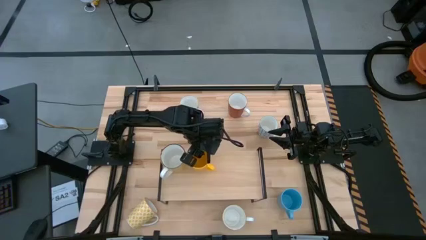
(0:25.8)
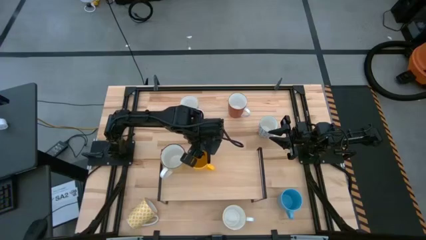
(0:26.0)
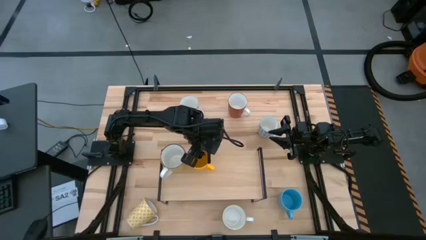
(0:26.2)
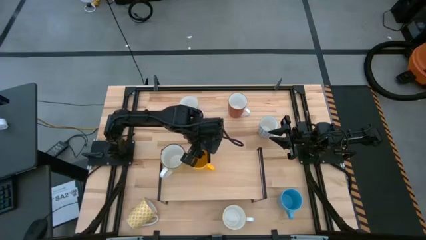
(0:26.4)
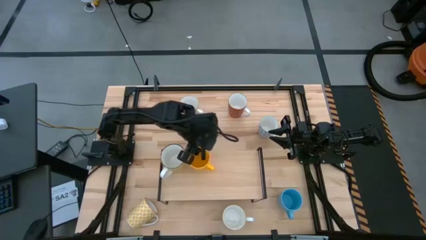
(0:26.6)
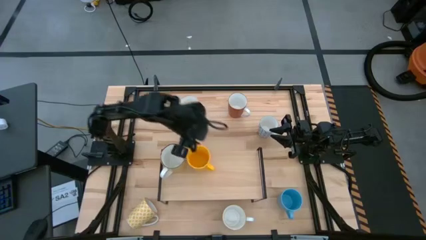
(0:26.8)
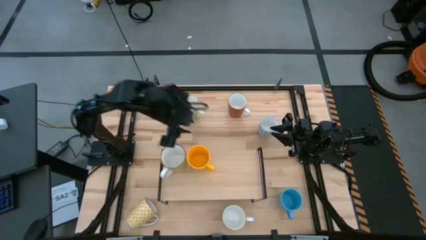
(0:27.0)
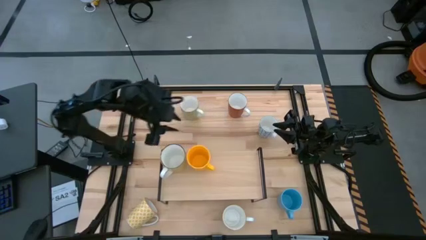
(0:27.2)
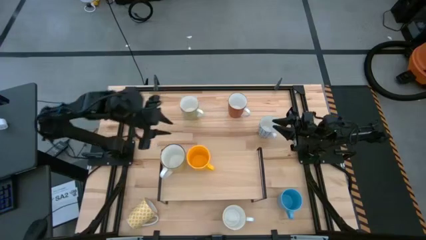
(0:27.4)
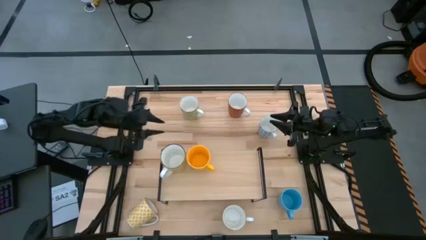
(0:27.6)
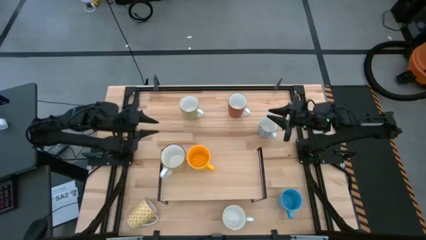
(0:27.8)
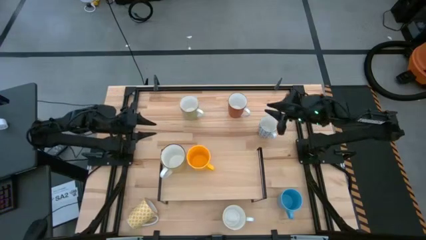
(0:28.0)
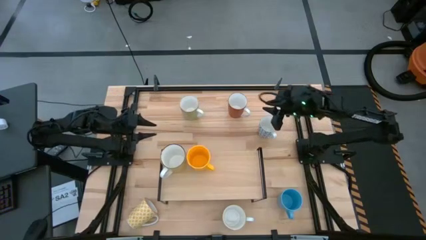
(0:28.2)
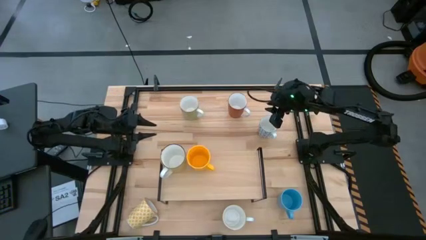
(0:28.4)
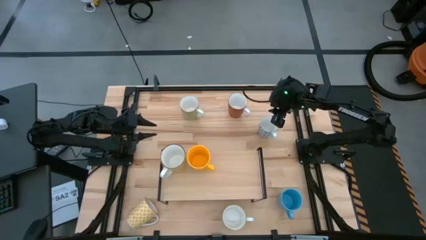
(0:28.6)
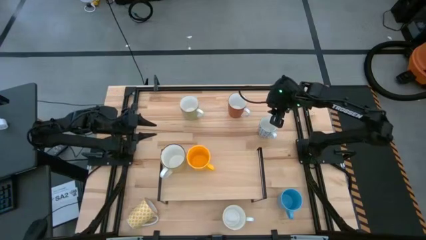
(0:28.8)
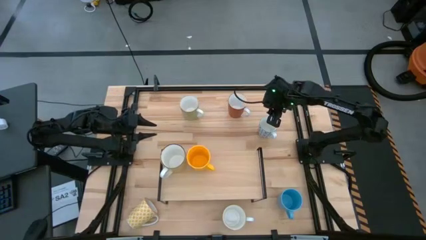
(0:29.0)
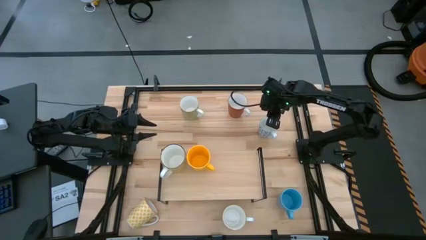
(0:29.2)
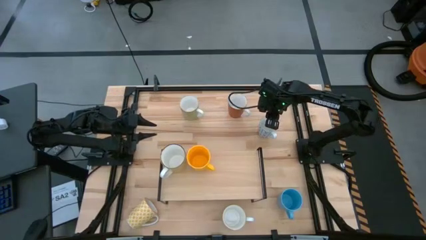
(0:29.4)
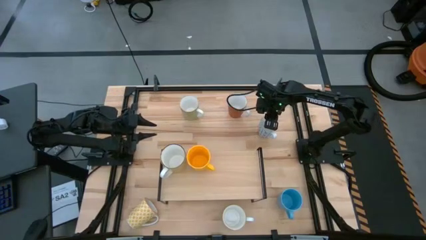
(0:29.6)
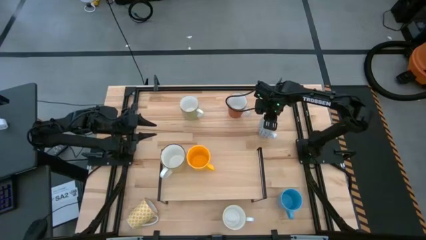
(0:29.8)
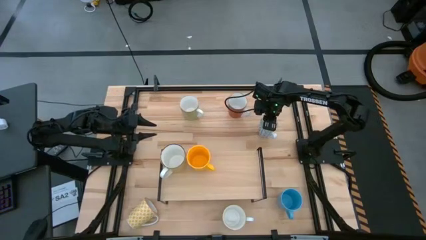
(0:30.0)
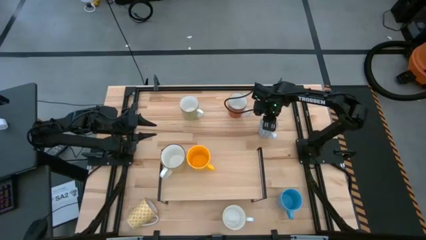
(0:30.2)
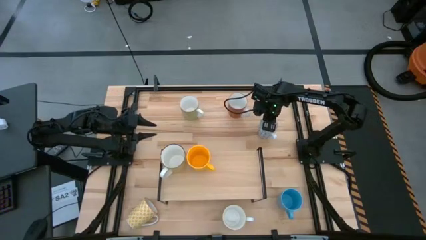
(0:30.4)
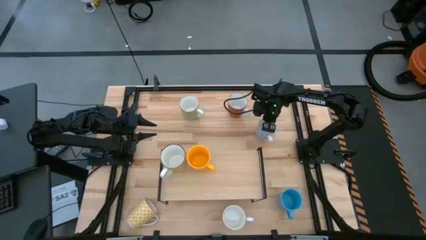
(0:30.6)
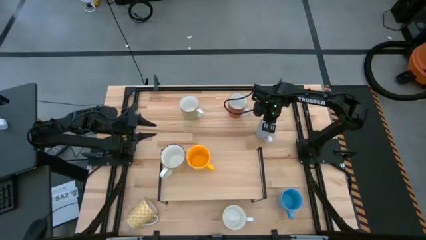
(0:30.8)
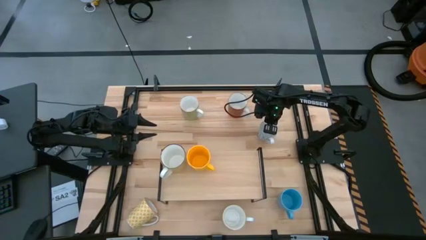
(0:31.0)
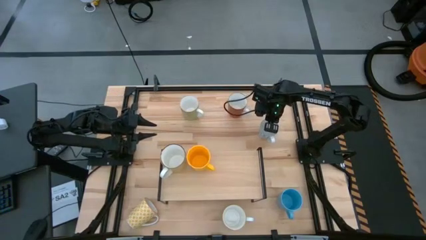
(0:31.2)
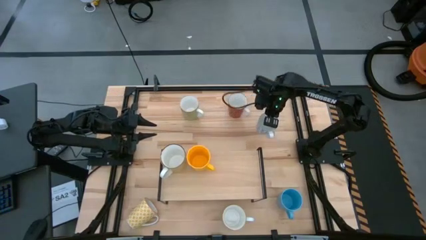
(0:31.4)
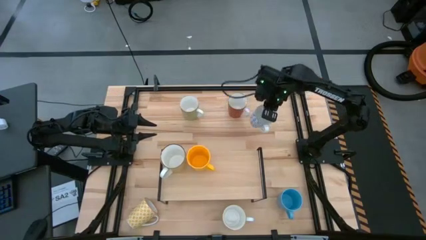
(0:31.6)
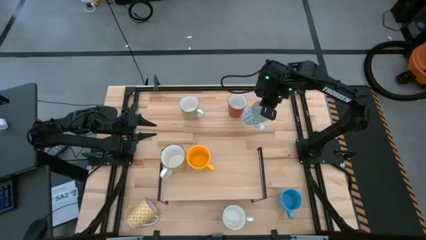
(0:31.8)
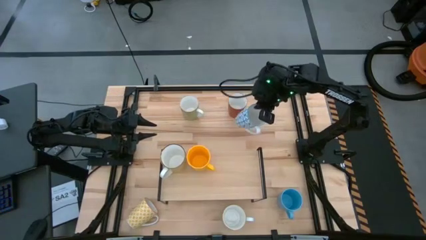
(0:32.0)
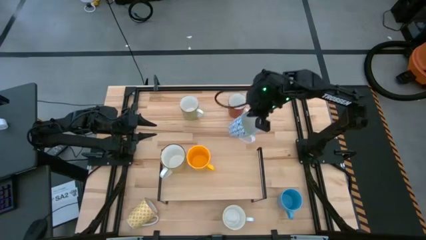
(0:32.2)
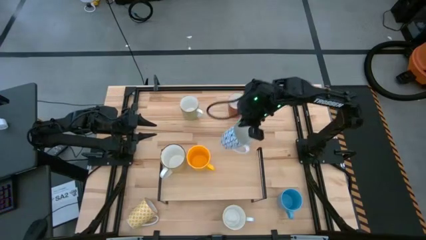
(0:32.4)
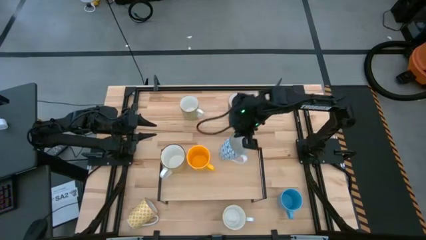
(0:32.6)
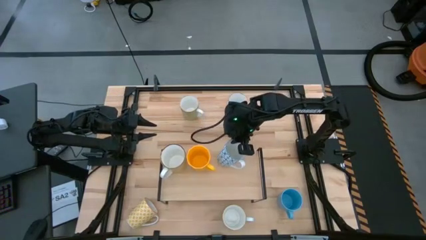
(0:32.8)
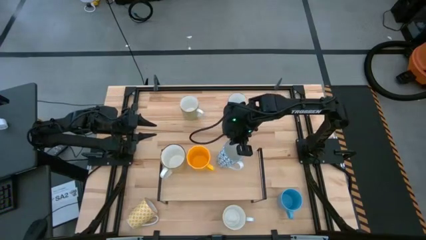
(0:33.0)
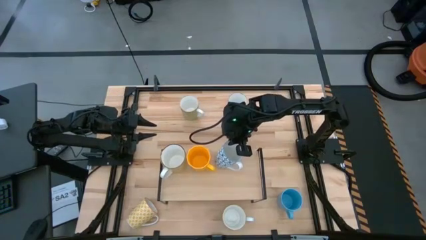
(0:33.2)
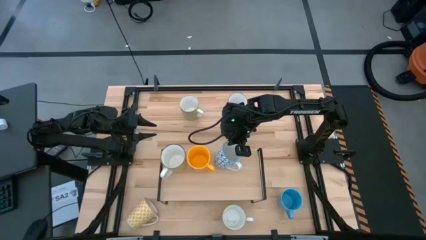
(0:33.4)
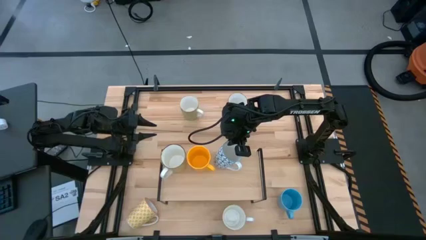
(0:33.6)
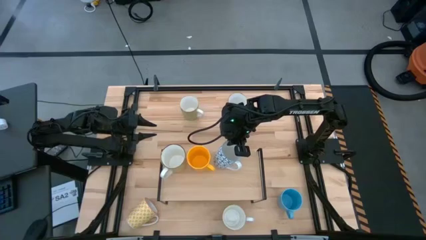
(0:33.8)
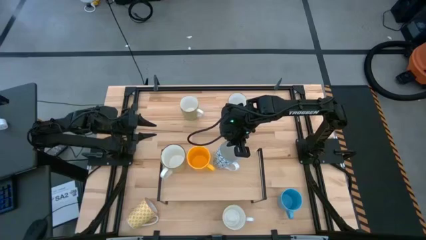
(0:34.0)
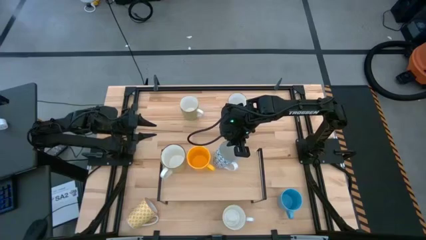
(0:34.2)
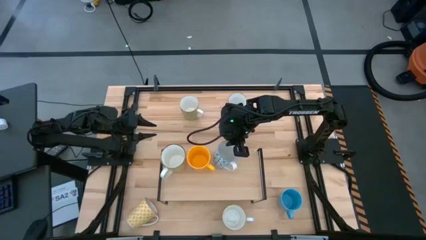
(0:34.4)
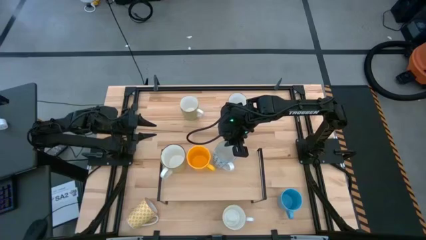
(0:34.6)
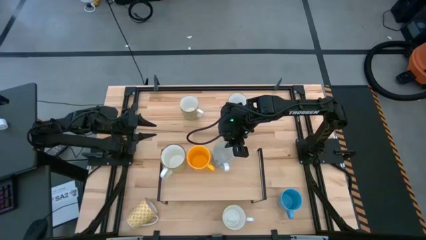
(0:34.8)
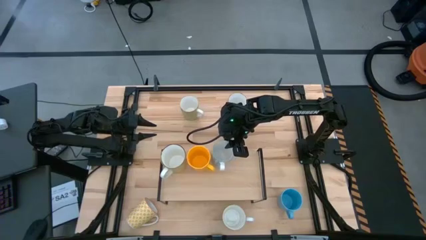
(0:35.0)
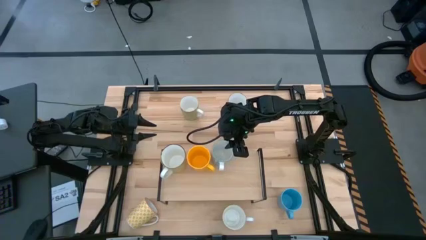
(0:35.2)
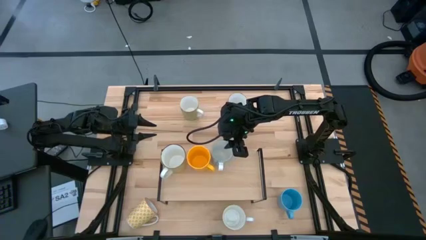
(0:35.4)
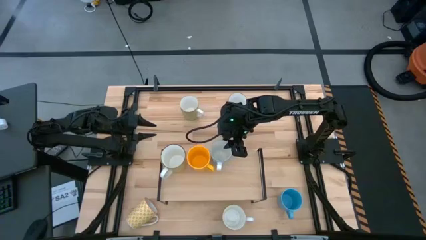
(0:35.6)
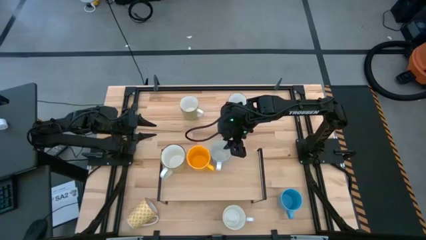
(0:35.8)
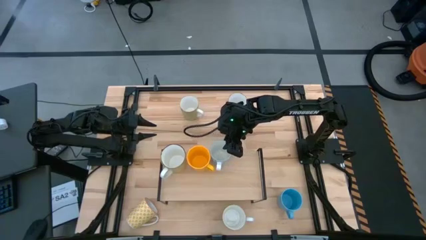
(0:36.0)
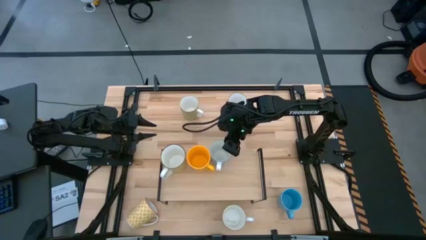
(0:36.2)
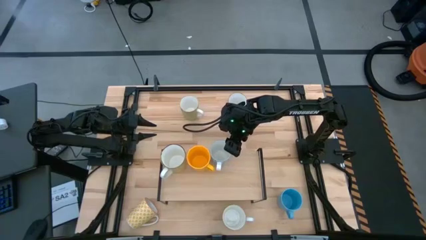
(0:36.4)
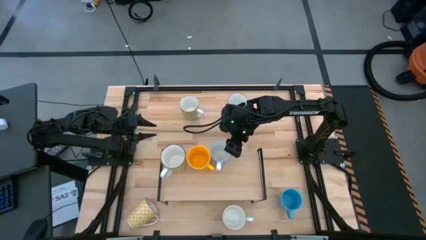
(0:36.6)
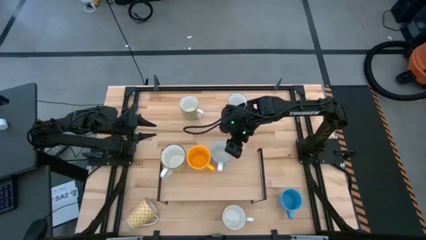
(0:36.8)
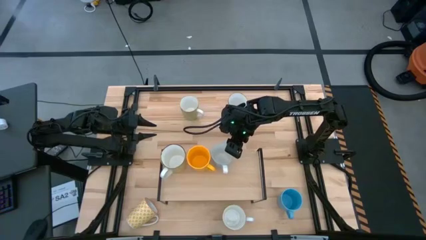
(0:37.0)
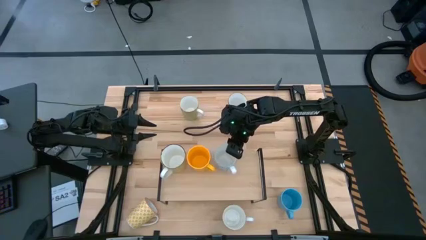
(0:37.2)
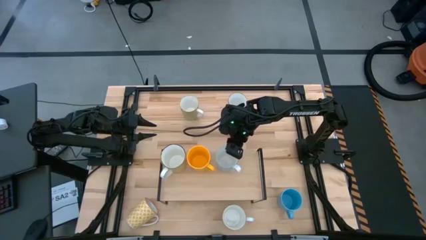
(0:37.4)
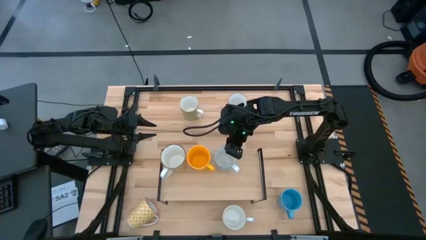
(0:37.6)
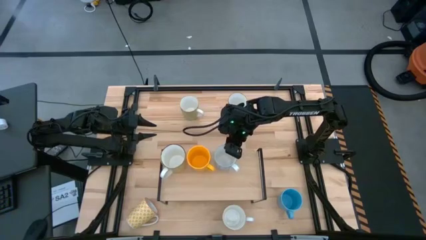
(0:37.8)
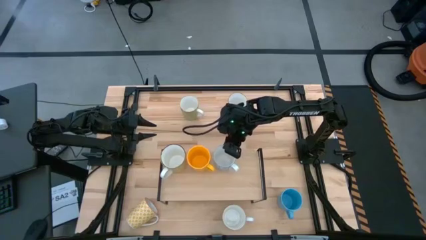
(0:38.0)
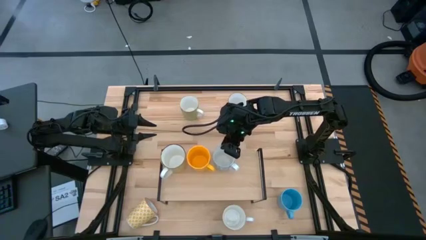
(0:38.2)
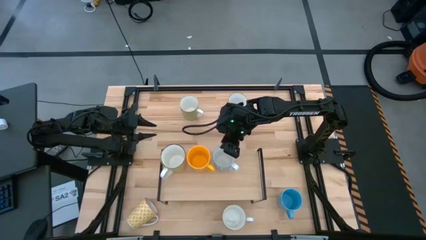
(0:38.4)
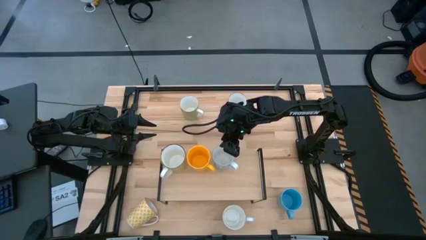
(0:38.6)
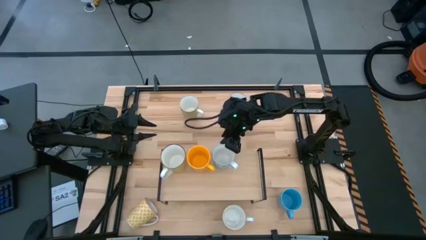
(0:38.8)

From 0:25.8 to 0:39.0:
Task: Place coffee mugs
Put the blue patterned mug on the shelf

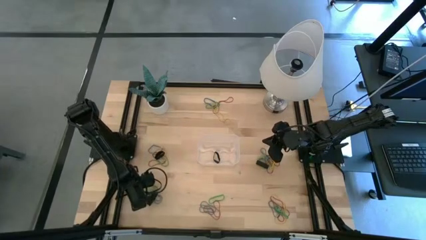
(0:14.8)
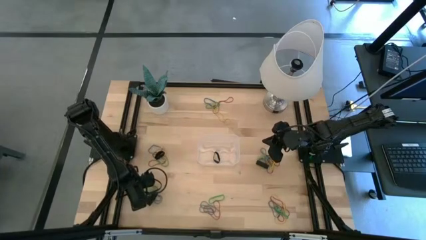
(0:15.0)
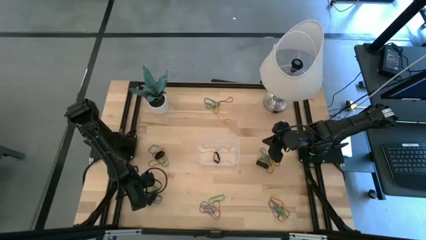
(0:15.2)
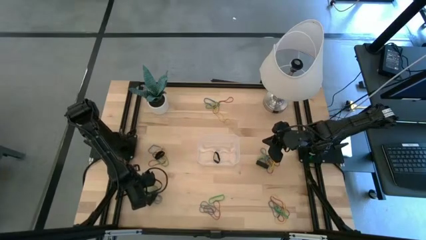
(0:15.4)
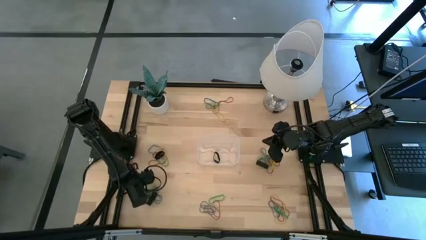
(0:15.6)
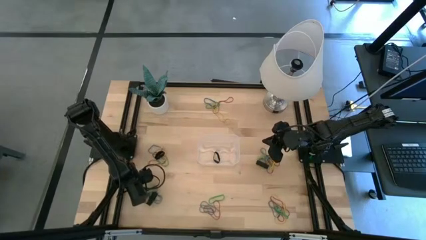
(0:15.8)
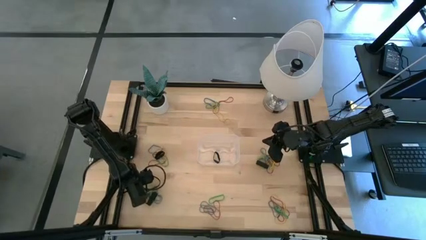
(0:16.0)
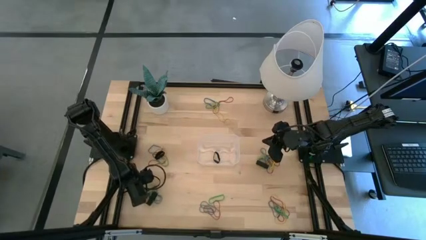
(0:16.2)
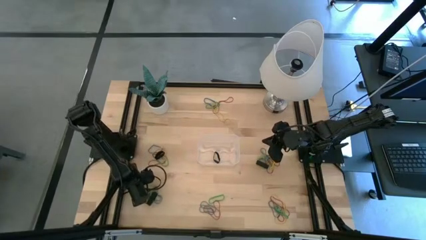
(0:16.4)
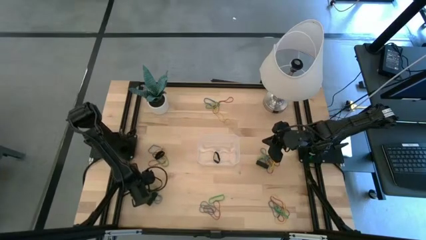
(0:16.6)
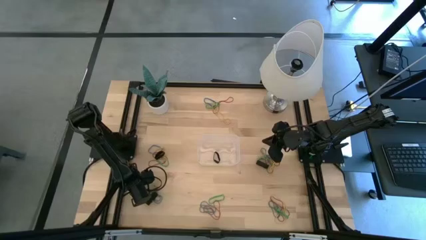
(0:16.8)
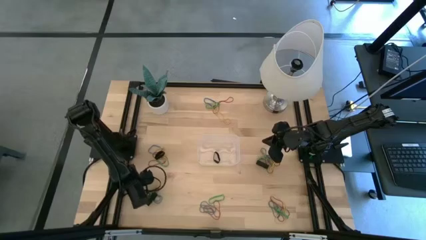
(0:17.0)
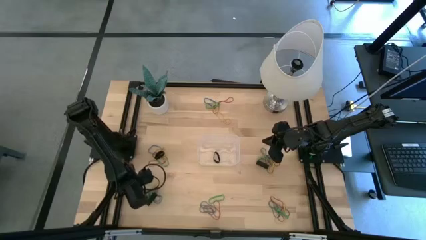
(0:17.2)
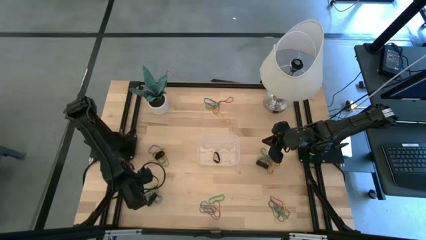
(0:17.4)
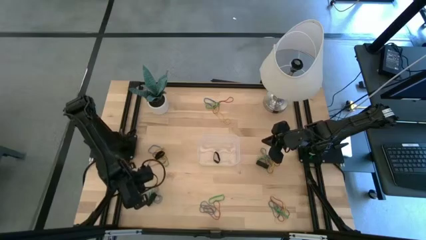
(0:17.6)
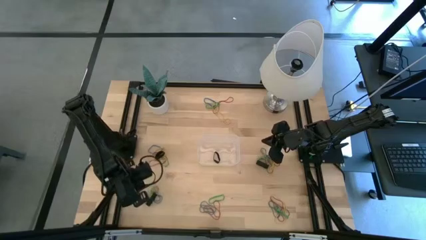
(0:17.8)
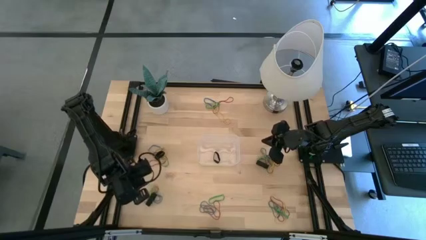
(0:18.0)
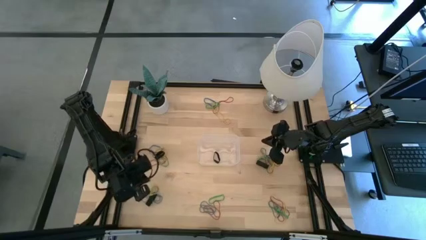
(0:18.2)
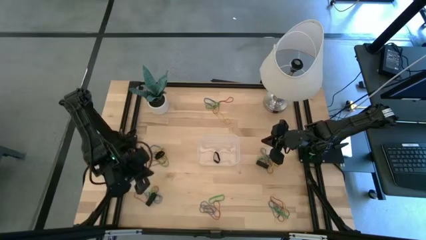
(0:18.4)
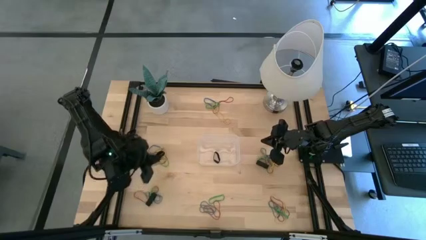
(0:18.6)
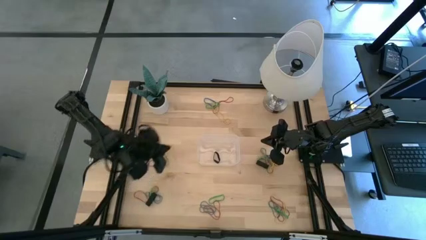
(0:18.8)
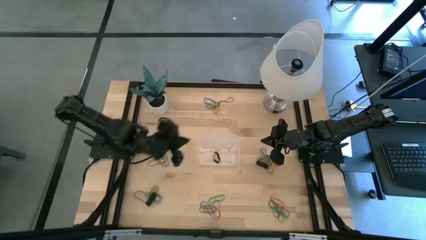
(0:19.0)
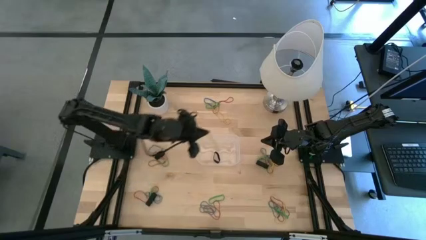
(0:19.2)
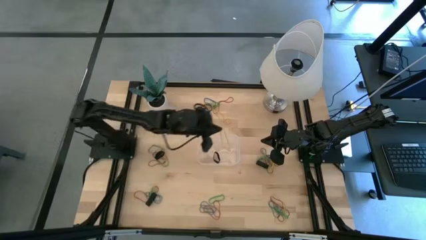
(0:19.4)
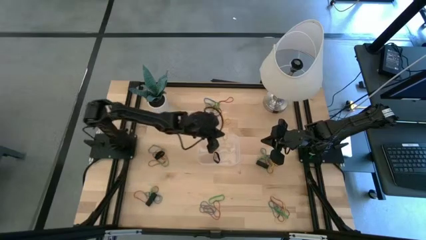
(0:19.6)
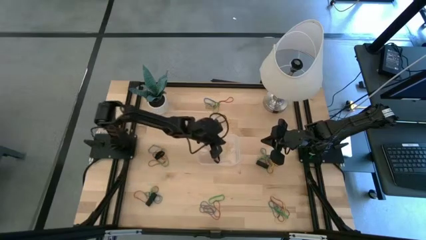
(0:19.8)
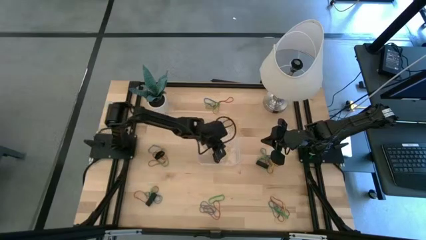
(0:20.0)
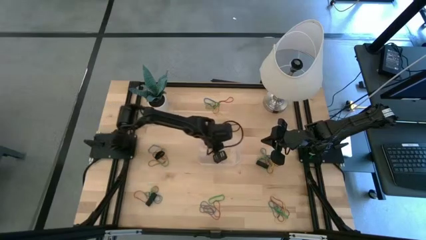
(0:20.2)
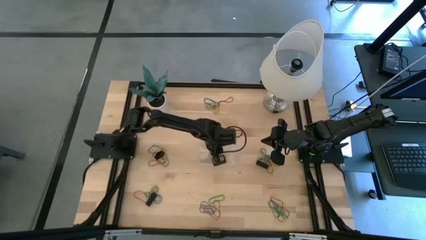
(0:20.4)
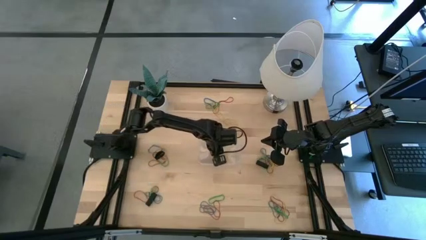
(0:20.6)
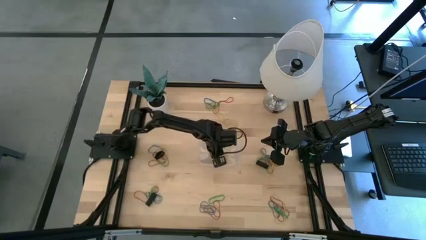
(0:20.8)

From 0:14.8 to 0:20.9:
Task: Pick and place rubber bands into bin
Put the yellow rubber band into the transparent bin
